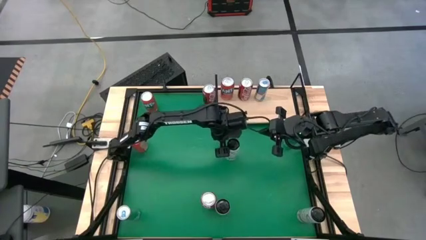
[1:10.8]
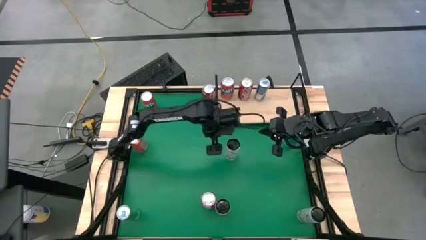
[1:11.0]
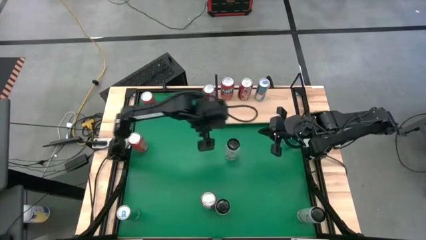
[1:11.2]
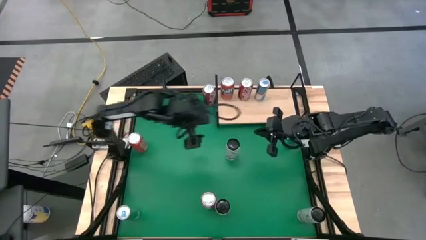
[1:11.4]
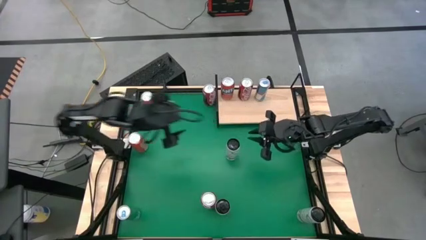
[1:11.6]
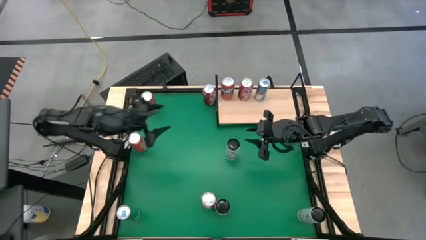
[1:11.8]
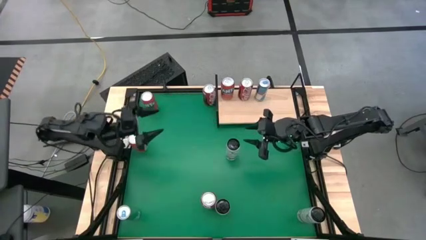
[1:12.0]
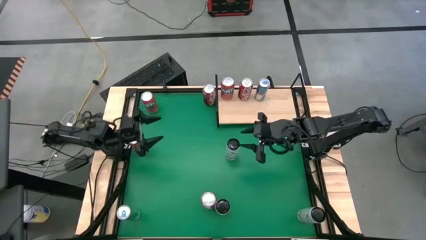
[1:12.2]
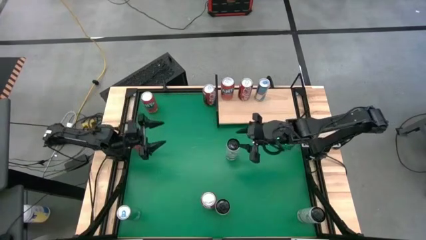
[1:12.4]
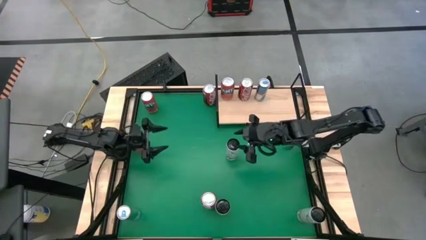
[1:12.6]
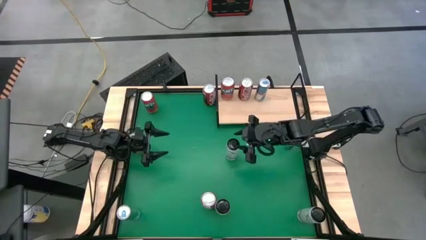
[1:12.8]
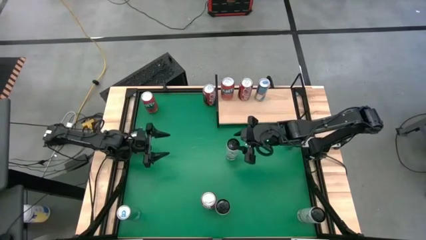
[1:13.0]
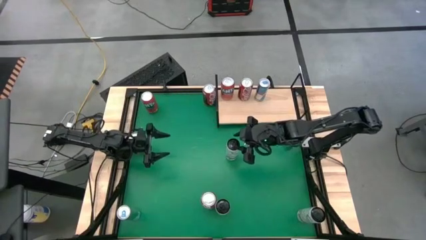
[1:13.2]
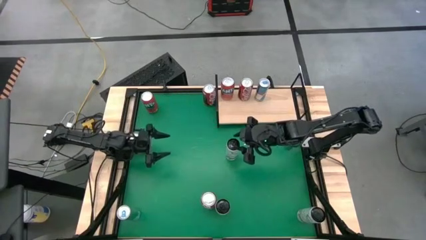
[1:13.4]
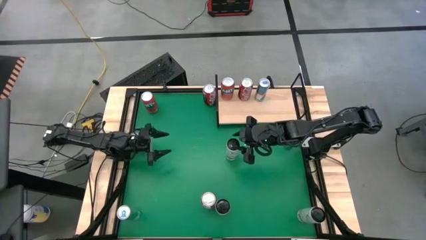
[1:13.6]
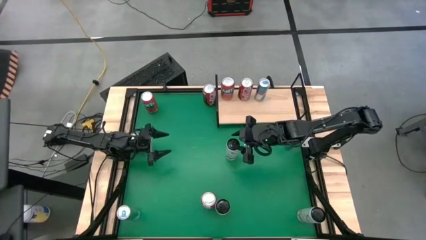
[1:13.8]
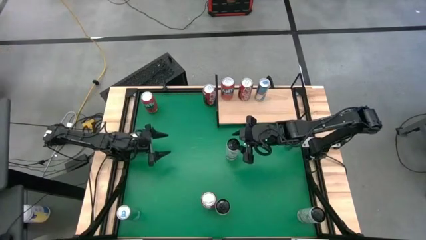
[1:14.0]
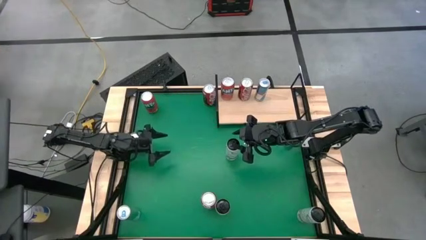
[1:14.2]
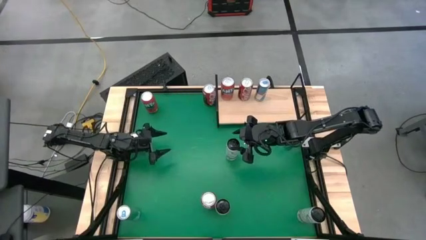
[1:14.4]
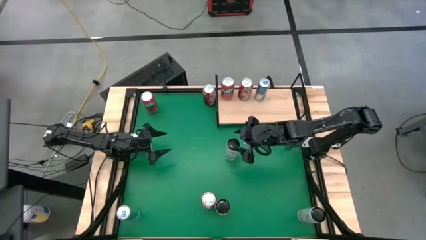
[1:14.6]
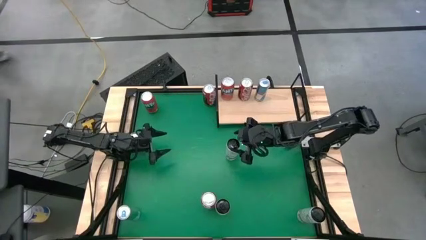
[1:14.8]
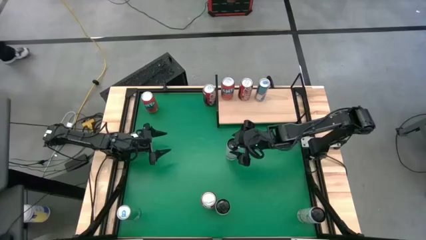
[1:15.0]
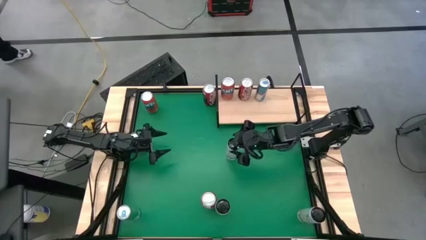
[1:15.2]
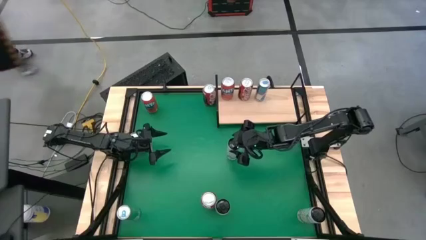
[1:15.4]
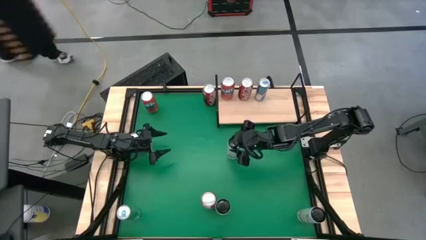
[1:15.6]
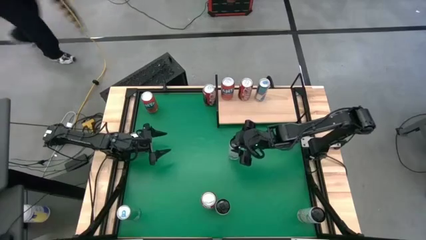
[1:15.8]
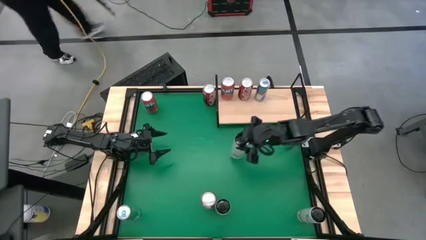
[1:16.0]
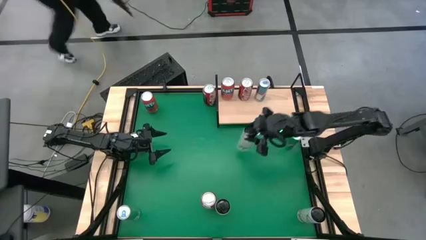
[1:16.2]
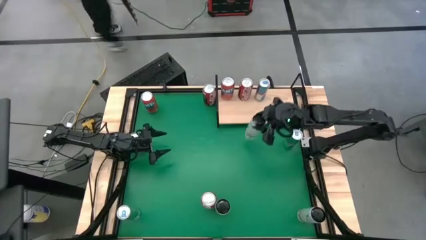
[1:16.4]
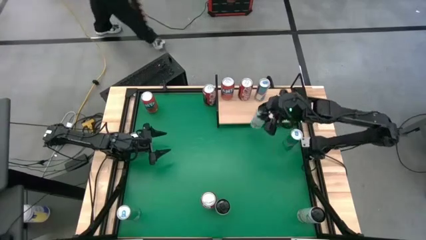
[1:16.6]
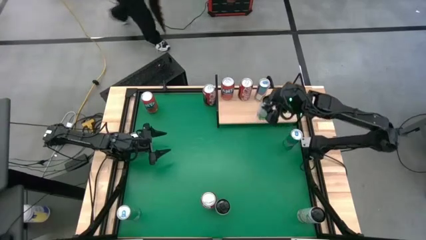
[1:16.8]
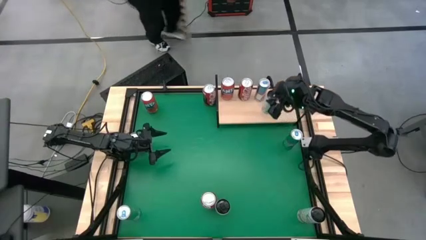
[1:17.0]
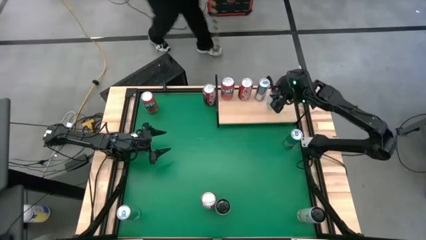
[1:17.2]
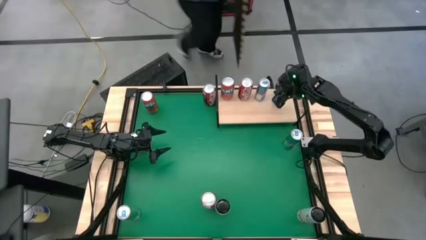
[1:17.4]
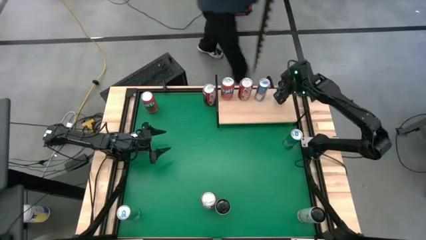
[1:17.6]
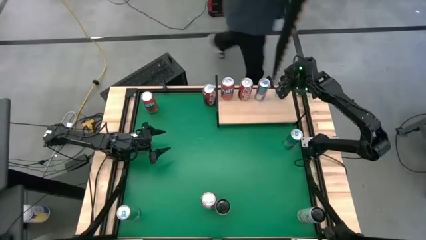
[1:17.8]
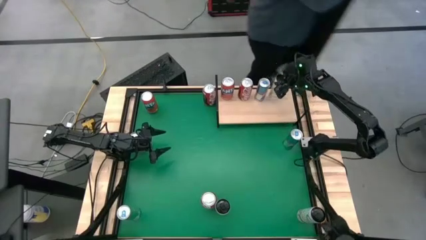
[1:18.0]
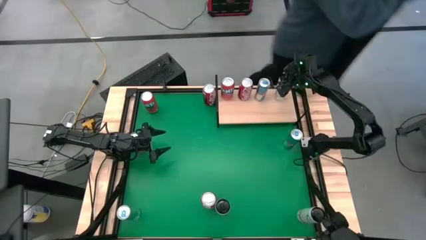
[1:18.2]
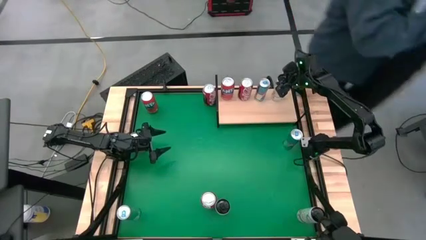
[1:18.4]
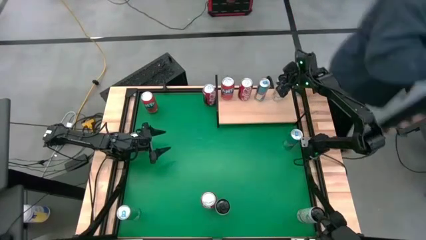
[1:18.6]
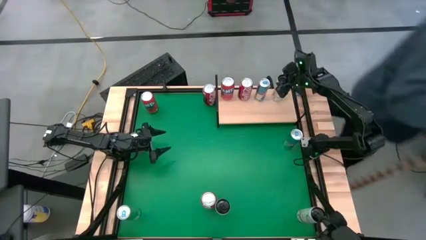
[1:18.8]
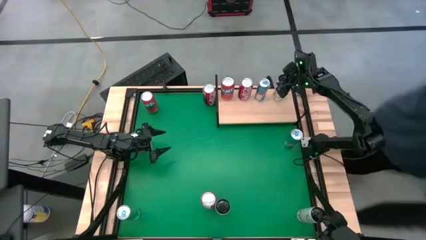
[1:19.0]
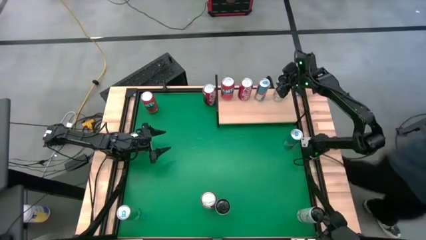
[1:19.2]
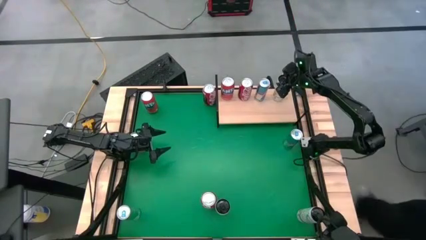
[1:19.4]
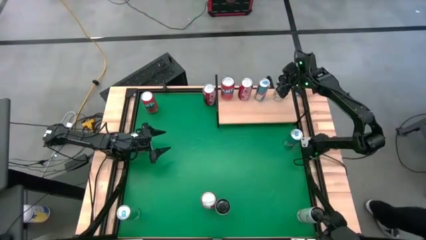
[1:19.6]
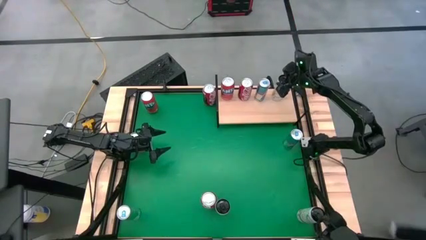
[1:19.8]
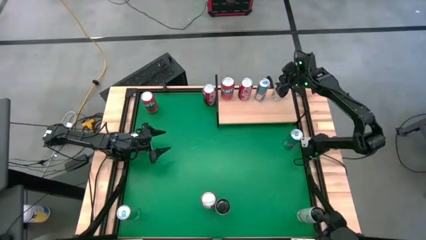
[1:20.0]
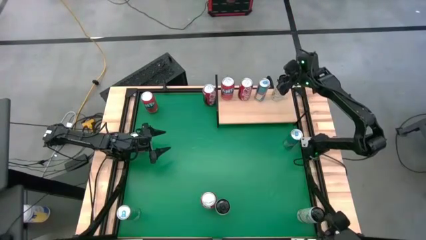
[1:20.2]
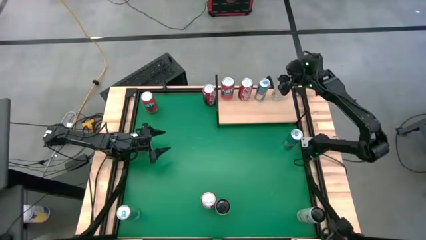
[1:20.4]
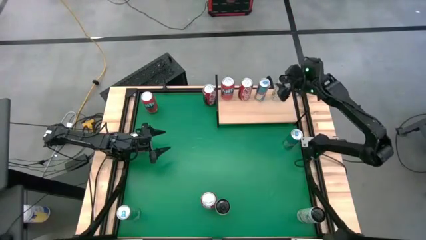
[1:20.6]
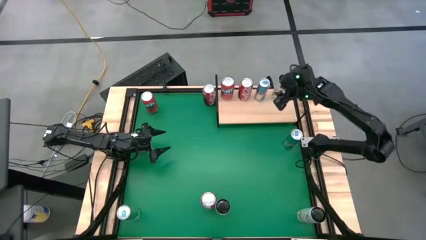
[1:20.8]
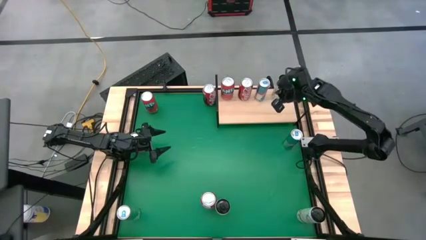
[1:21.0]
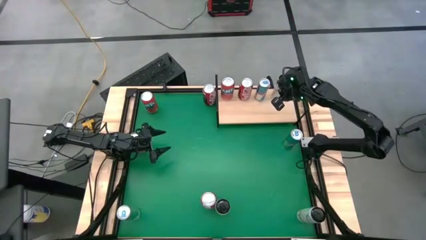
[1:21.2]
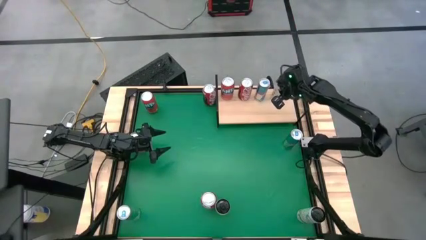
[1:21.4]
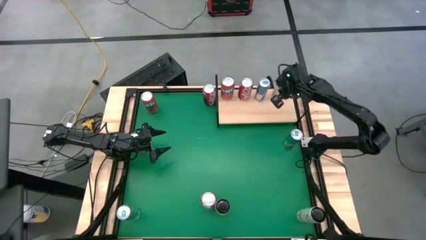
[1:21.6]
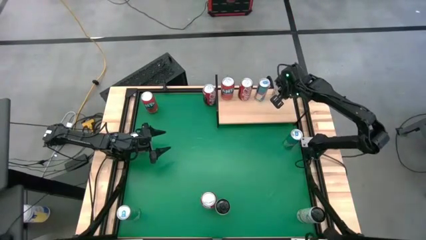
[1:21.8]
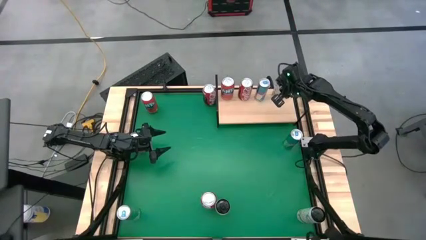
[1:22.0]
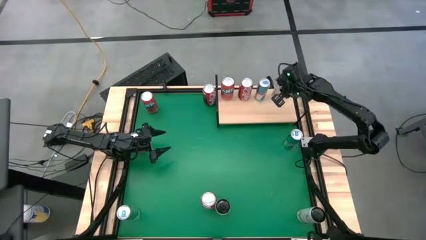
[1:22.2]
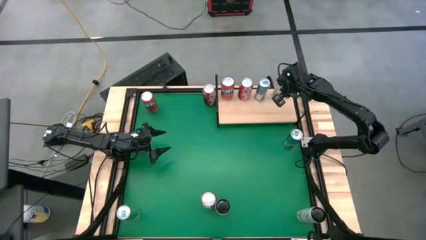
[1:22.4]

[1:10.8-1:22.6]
Task: Place canned beverage on shelf
Put the top left yellow soda can on the shelf

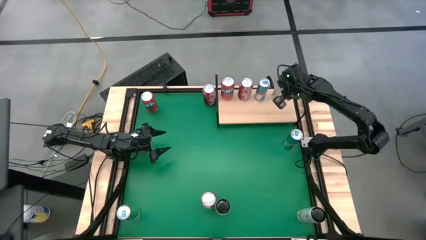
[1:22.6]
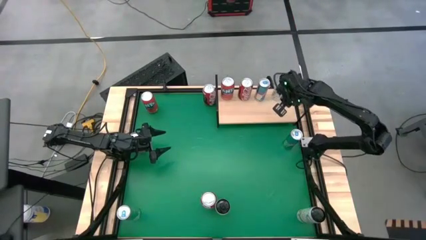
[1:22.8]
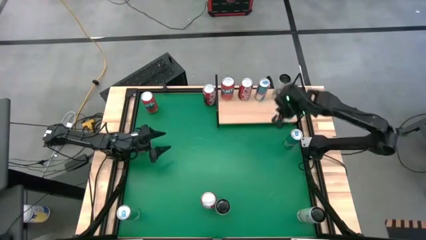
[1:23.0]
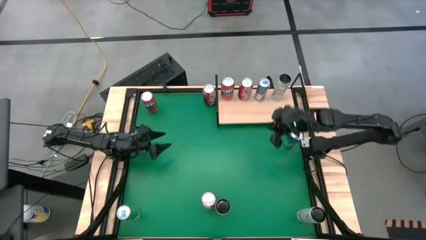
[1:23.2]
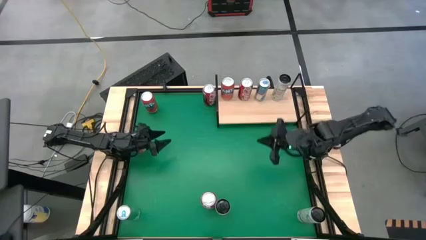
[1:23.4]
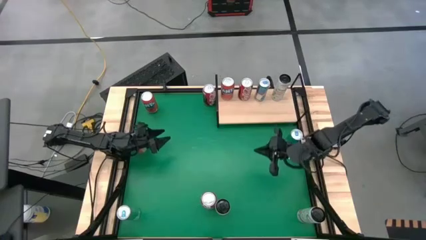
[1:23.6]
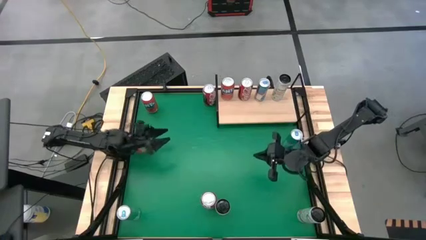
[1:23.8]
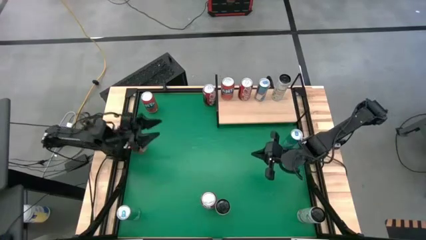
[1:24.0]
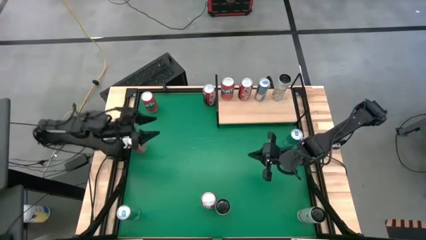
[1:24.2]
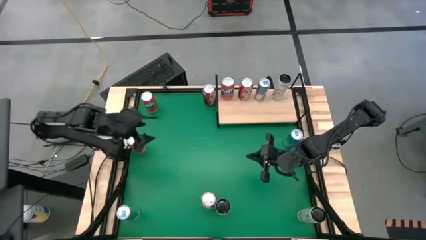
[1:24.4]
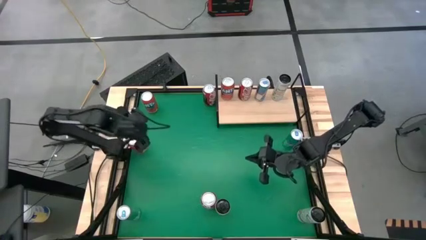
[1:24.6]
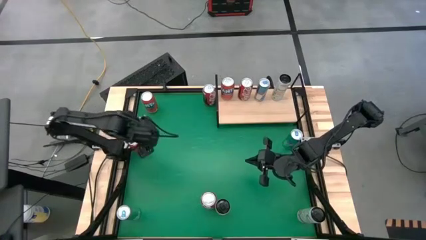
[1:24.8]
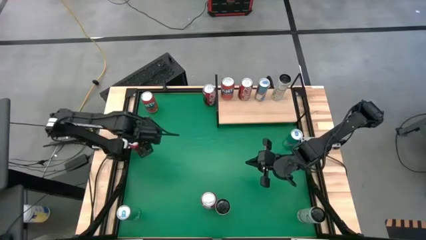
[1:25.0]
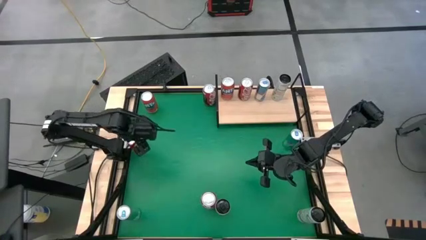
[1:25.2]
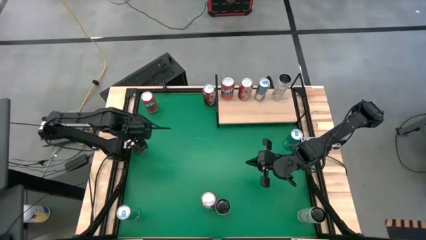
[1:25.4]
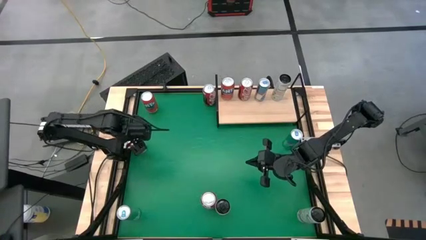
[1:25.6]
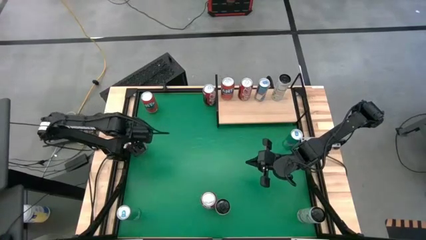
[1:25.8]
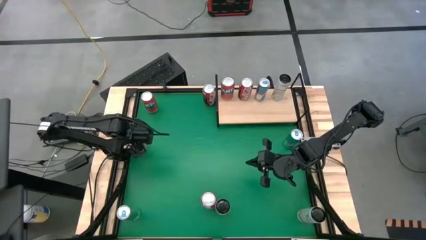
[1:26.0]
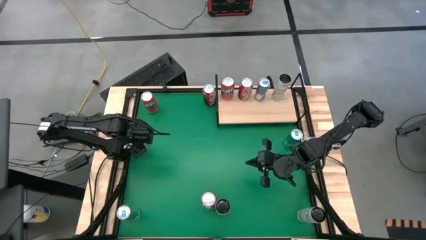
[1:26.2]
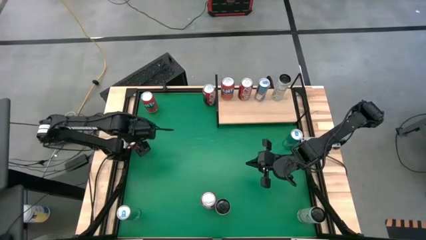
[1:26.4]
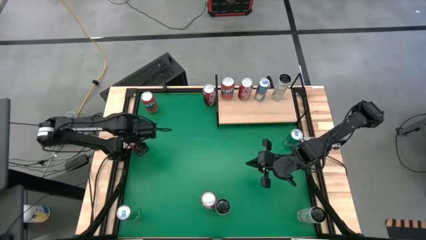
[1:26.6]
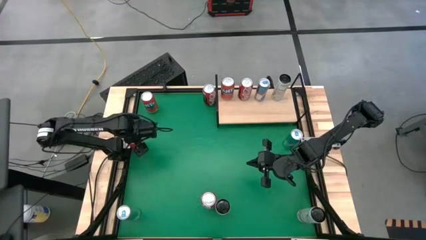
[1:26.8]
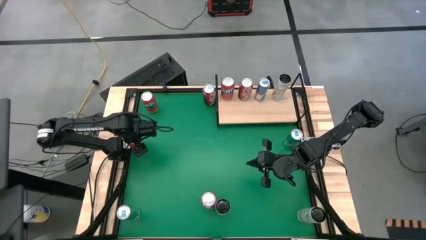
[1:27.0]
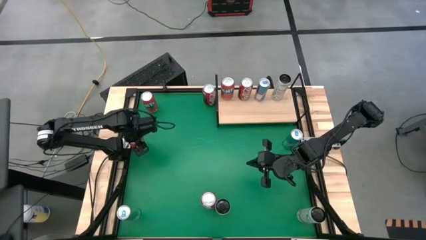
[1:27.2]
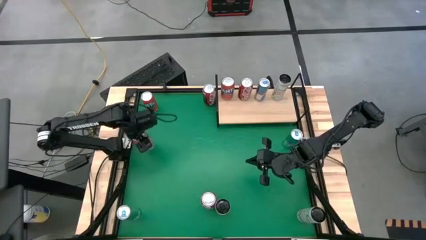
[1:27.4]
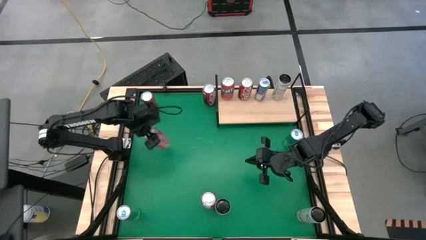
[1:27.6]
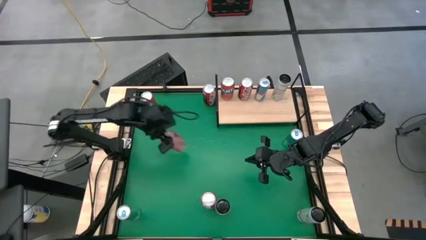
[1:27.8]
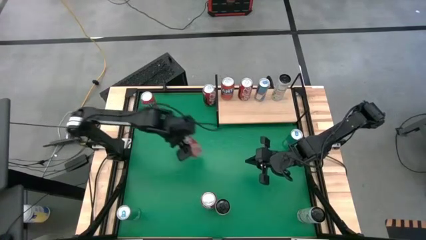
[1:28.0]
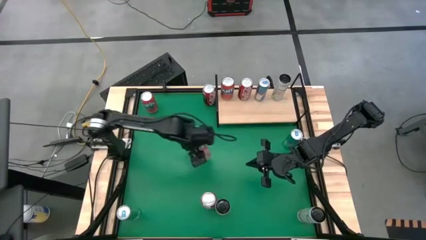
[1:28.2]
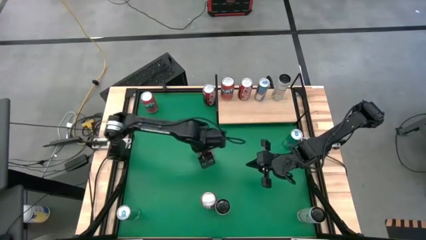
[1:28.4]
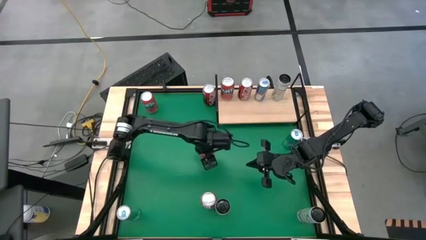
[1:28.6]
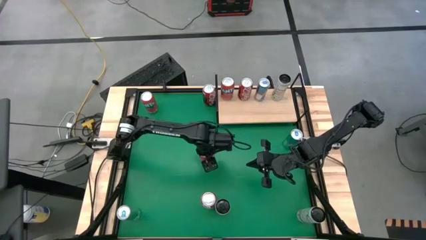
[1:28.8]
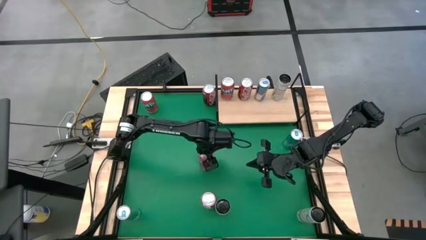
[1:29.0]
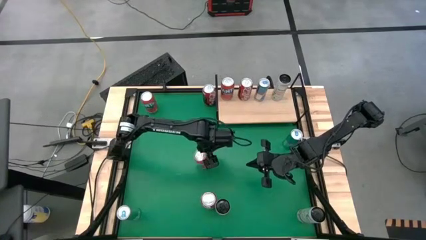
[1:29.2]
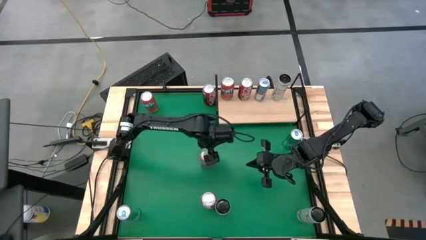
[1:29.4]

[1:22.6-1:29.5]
Move the bottom red soda can to the center of the table
